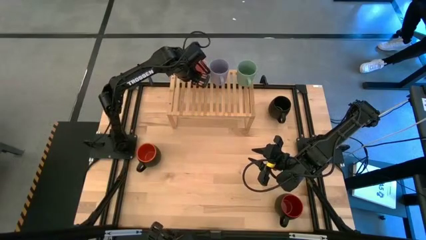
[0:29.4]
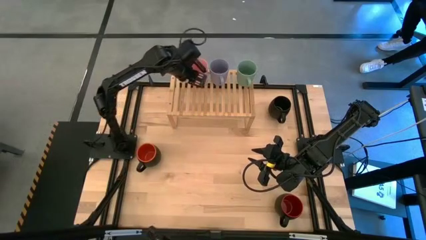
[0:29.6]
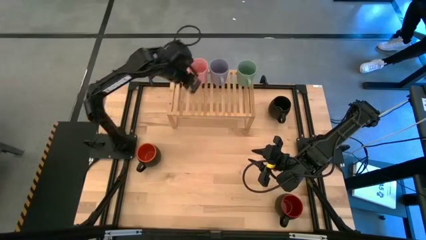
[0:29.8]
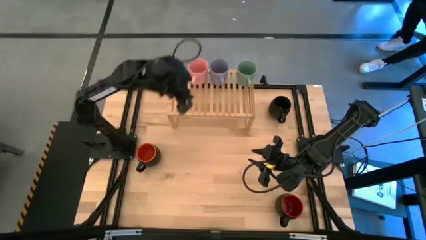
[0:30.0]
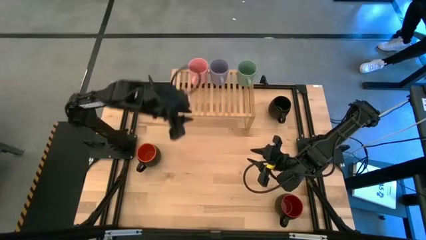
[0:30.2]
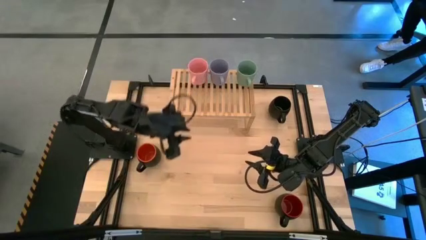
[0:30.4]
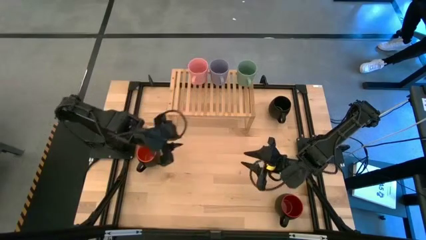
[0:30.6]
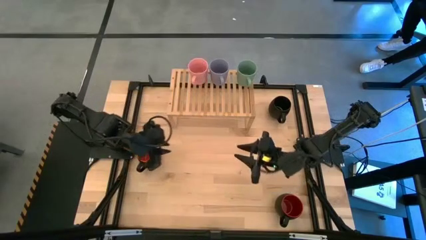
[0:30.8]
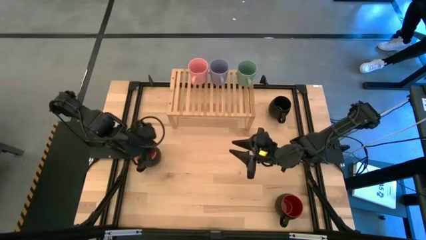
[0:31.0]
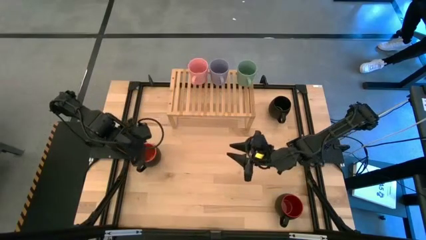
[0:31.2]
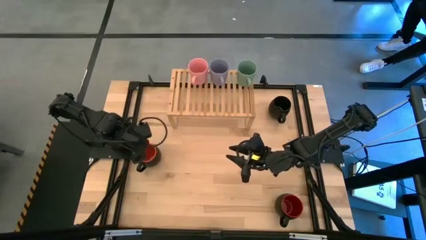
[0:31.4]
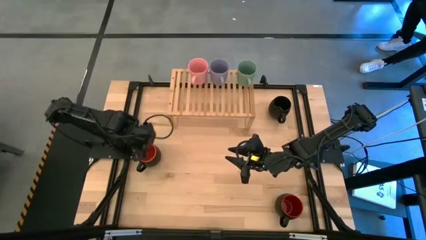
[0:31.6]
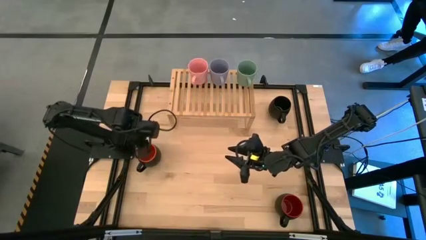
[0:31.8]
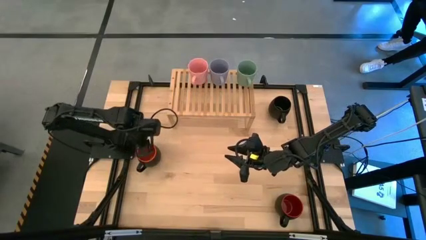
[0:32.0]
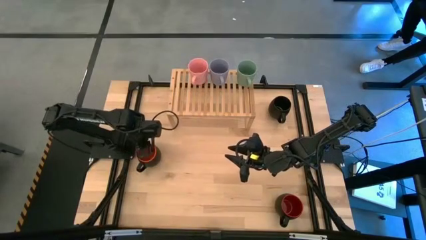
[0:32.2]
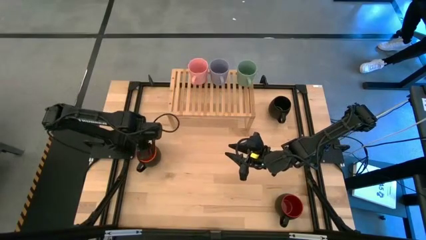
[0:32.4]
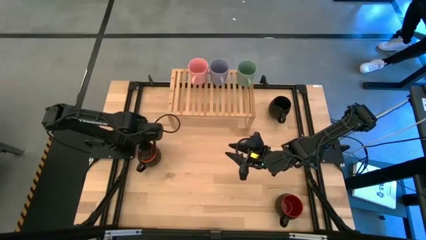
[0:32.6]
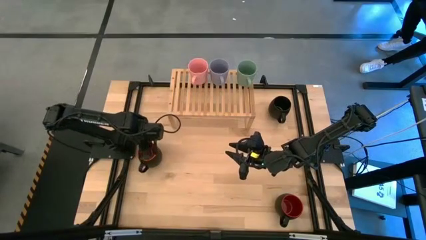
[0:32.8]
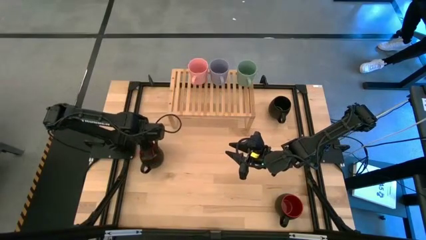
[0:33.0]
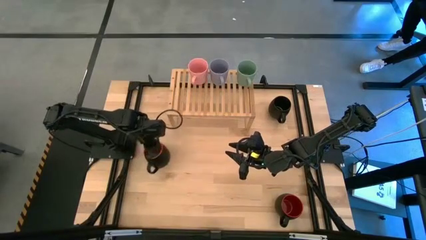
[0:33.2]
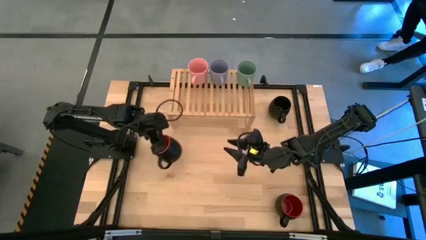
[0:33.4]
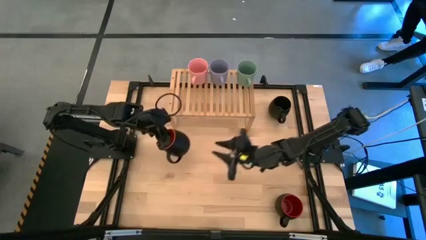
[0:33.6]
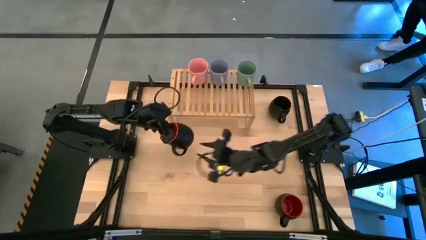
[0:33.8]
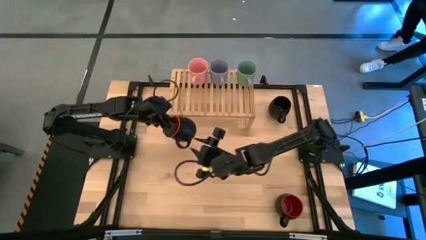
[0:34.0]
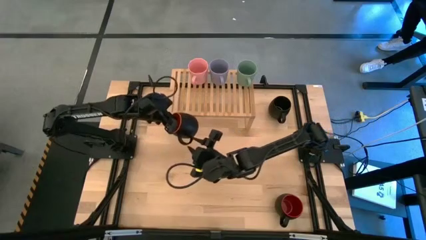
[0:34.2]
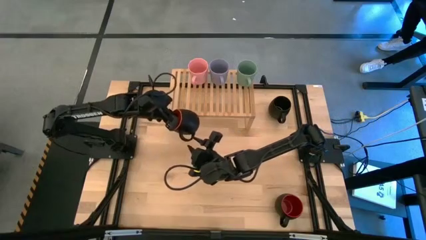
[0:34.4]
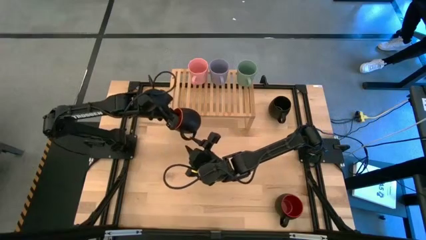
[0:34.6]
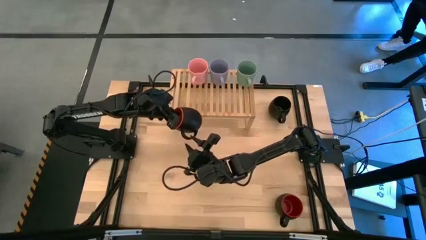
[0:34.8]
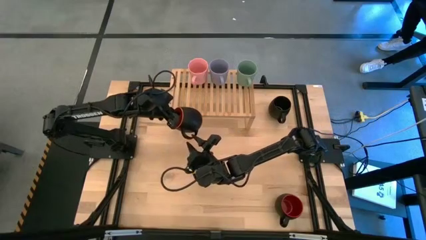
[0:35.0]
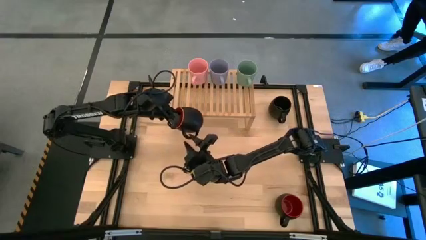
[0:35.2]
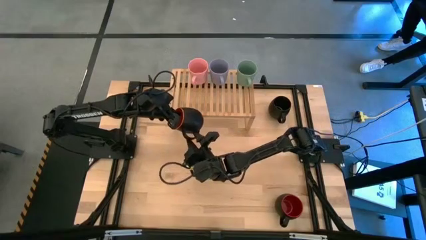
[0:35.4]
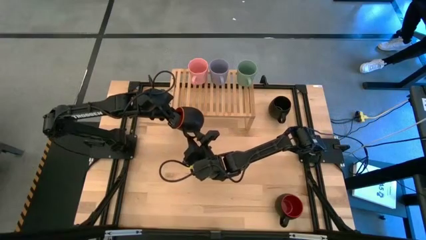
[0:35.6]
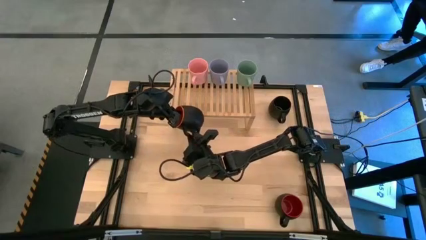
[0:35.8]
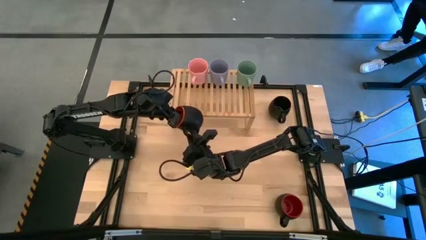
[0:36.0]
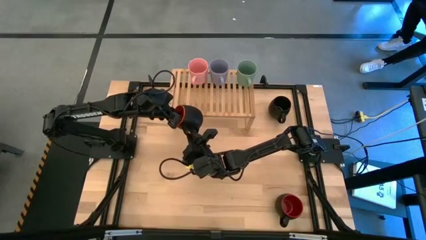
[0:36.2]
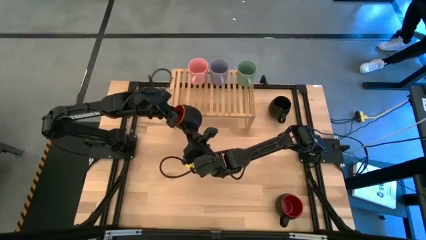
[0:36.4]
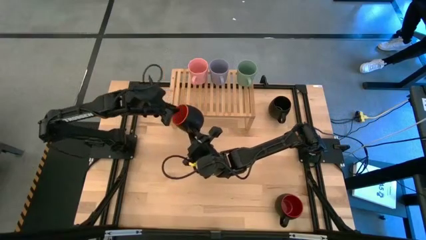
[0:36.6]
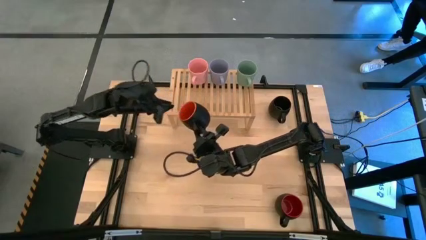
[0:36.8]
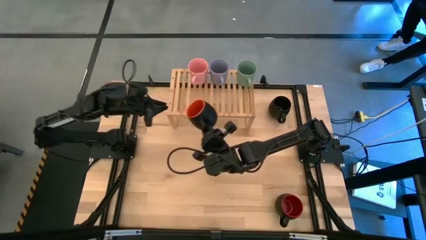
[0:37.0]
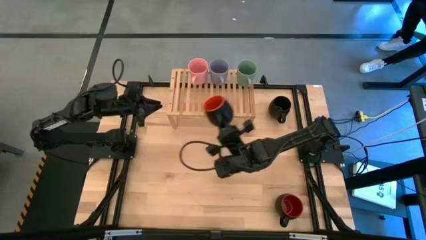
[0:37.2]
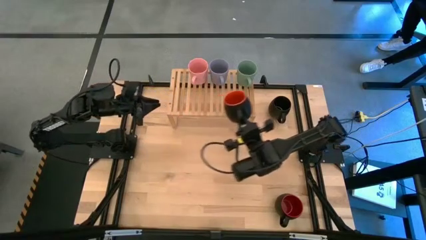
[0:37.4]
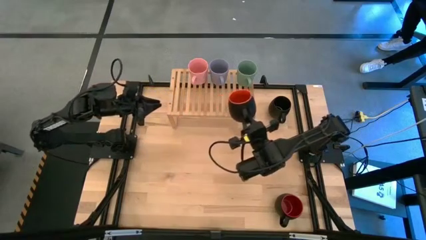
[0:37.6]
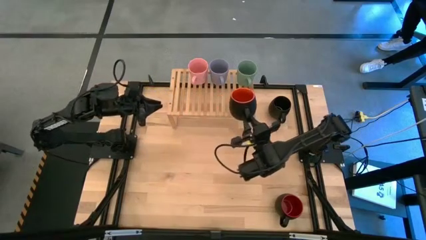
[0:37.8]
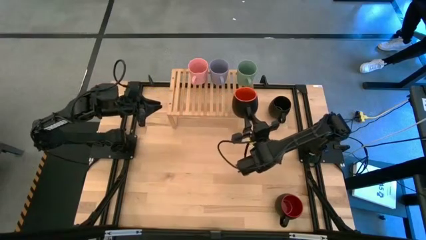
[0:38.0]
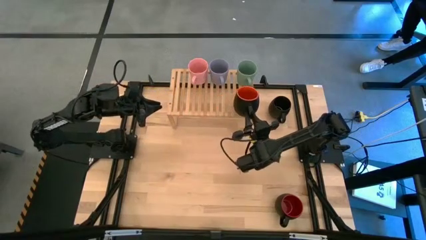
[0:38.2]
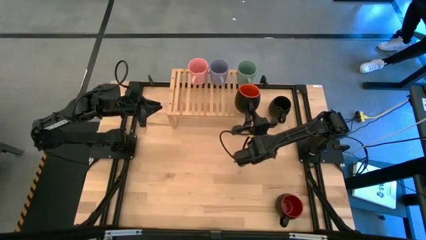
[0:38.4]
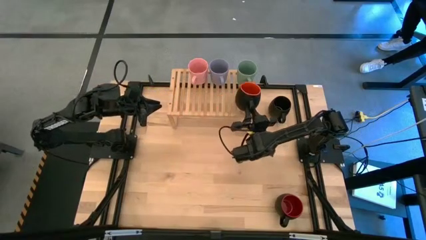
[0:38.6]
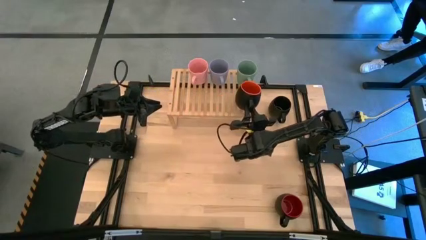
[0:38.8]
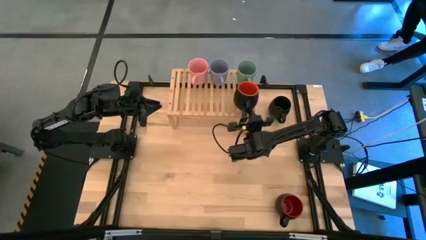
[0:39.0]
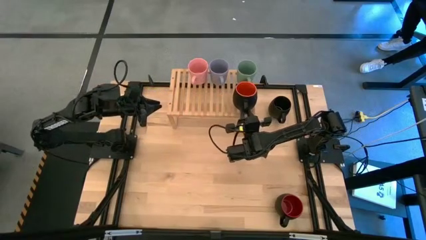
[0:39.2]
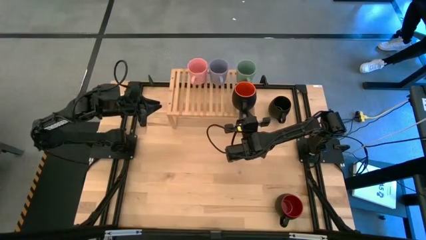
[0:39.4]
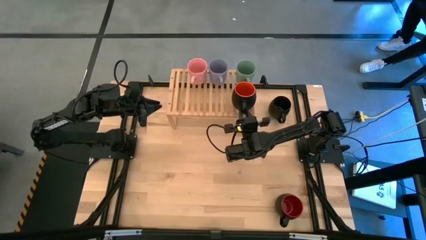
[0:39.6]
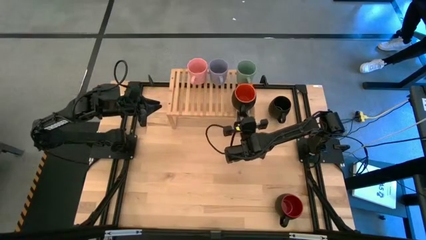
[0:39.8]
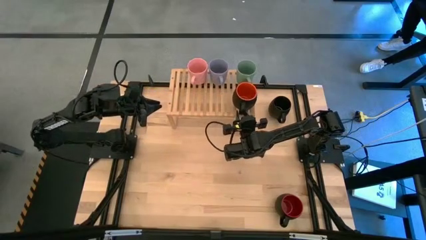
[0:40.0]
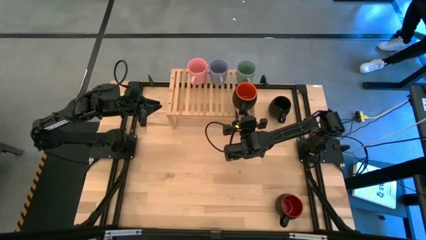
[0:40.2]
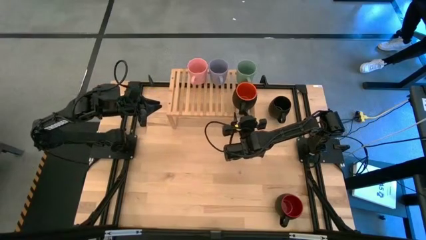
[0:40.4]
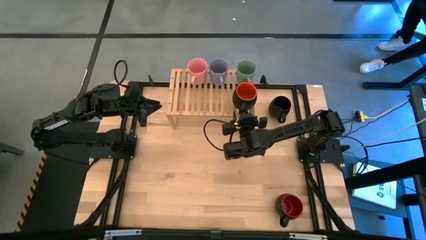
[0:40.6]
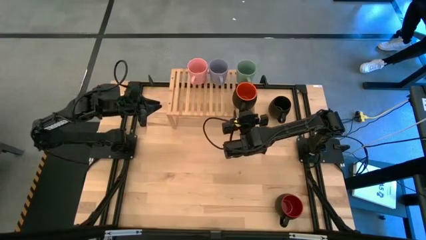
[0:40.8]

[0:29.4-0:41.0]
Task: Place coffee mugs
Put the black orange mug on the shelf

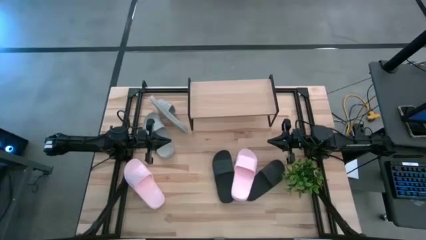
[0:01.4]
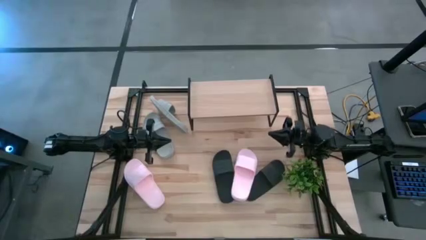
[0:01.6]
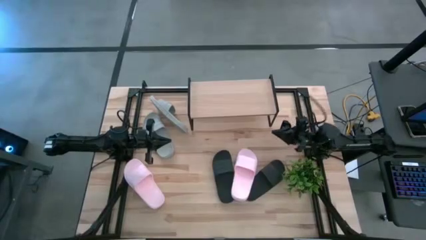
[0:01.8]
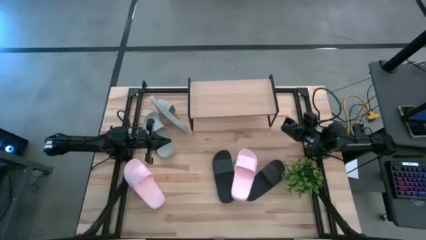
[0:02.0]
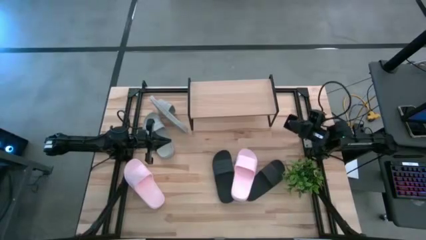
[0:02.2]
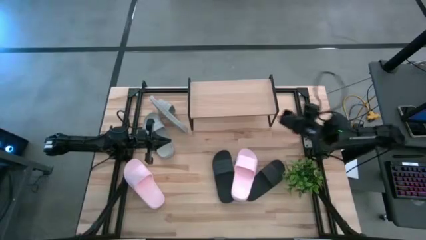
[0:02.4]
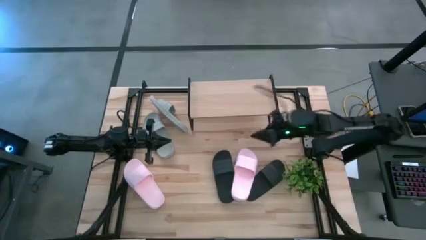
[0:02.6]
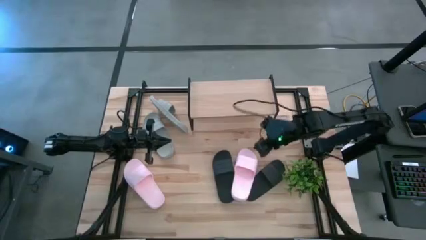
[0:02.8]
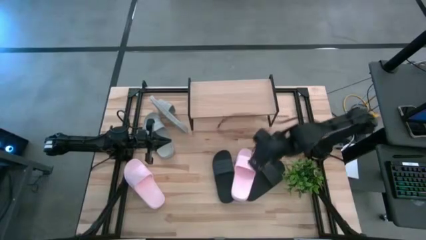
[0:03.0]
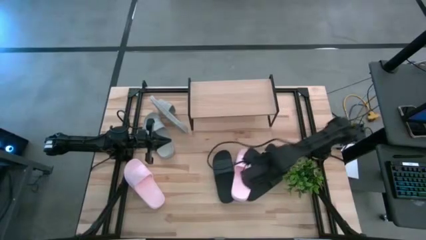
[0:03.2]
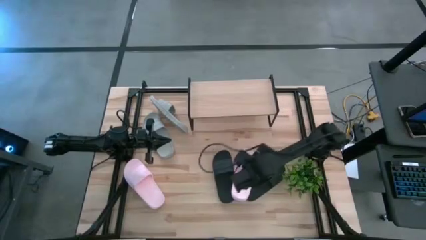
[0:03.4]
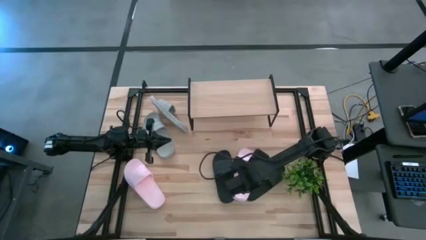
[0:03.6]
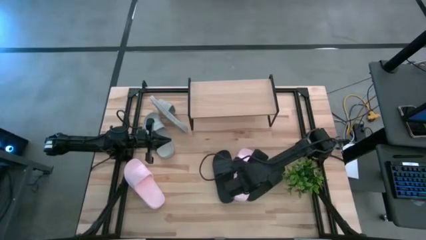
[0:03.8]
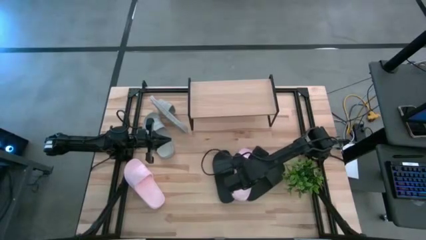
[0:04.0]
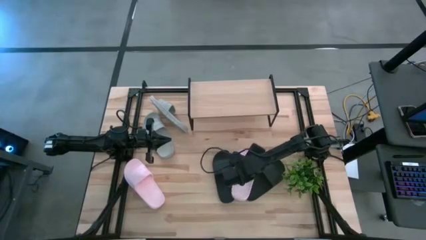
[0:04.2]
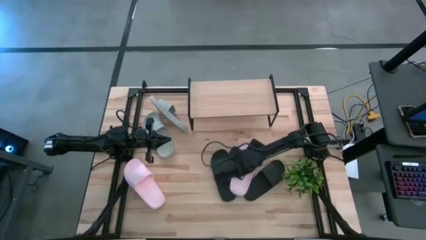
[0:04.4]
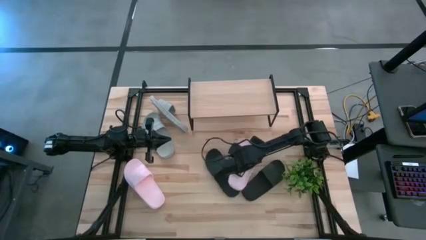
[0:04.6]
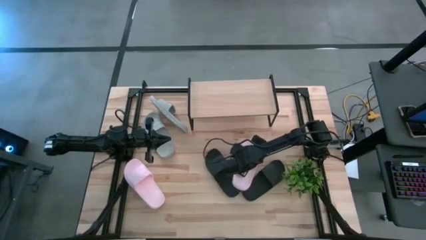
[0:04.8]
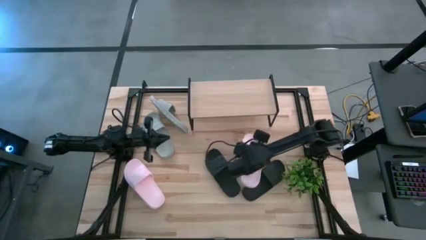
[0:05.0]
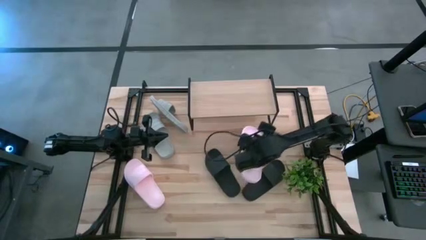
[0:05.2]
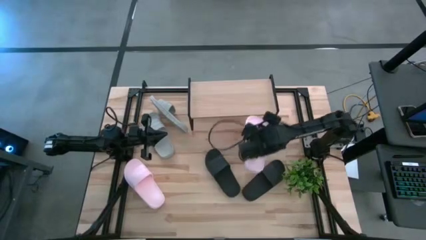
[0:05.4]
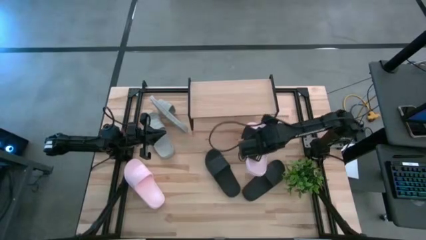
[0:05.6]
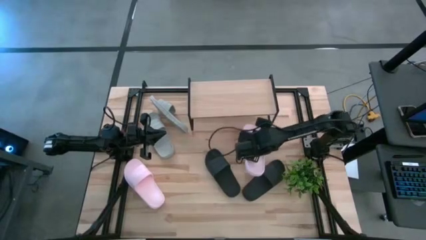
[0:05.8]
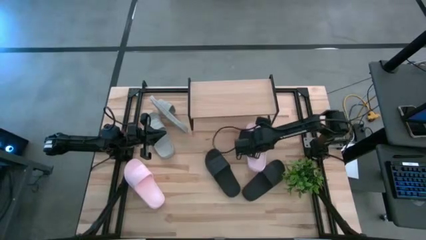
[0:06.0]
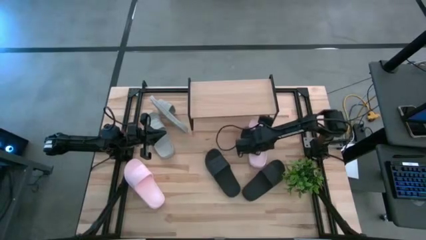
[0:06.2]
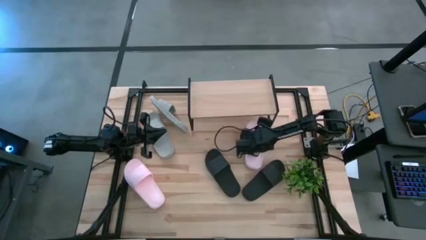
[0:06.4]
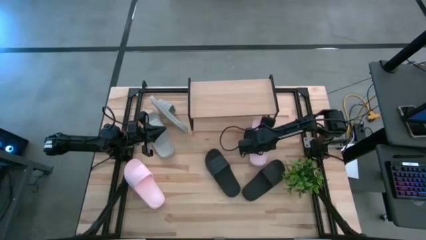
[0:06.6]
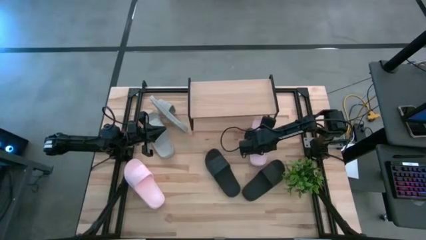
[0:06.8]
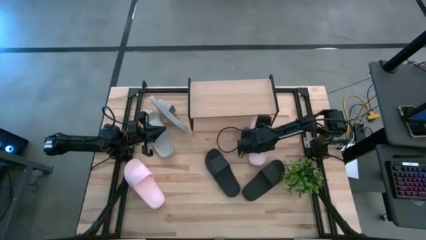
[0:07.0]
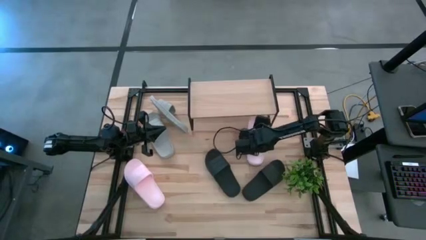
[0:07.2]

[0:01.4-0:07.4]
Task: Pick and place slides into the shelf
Put the right pink slide under the shelf
